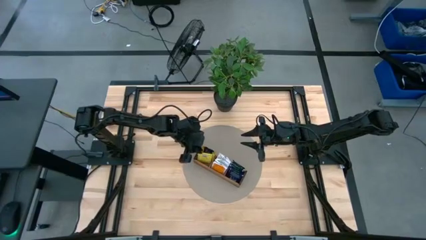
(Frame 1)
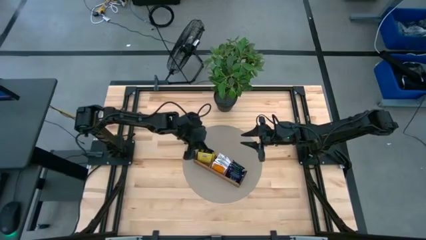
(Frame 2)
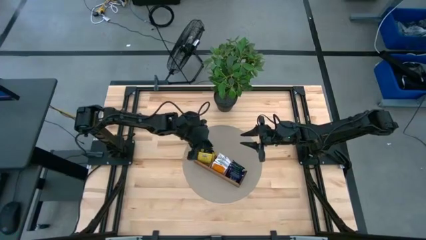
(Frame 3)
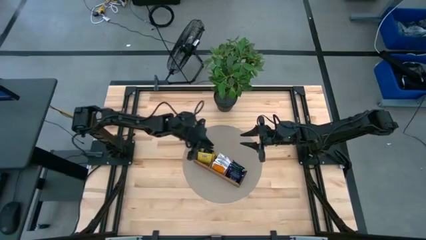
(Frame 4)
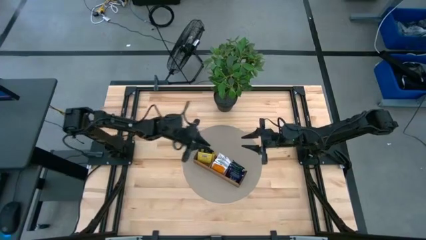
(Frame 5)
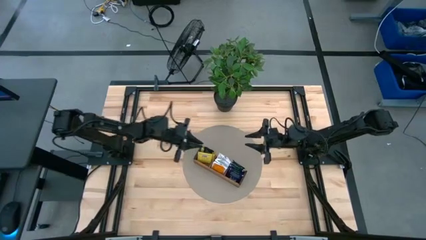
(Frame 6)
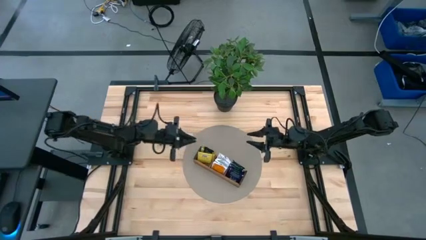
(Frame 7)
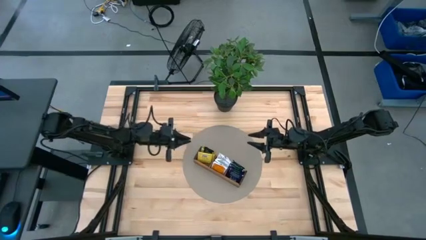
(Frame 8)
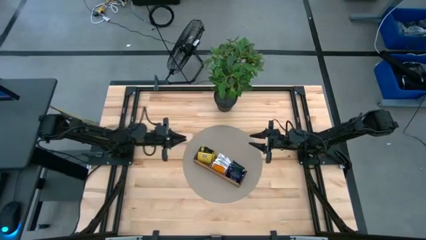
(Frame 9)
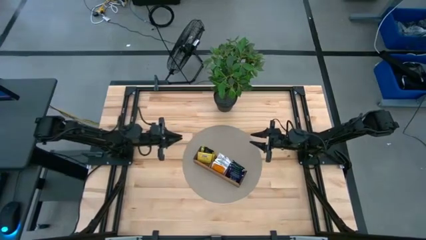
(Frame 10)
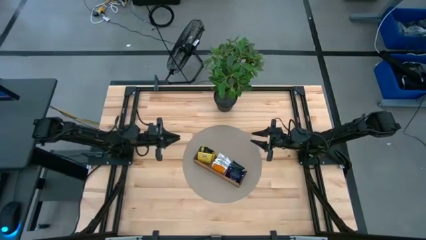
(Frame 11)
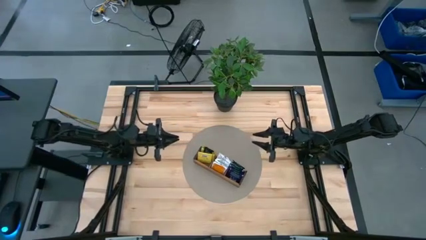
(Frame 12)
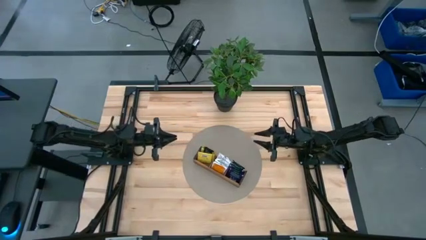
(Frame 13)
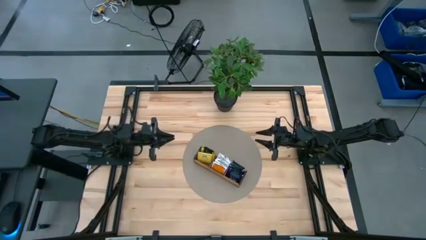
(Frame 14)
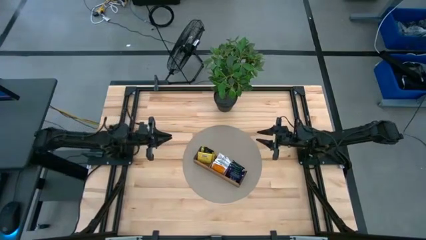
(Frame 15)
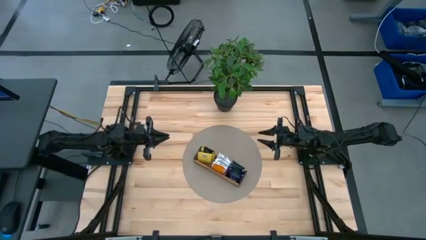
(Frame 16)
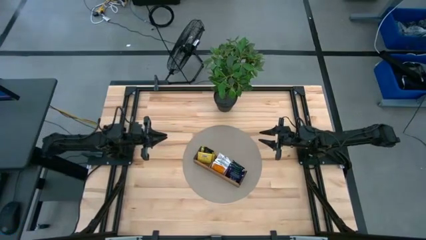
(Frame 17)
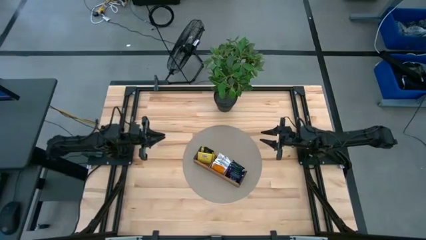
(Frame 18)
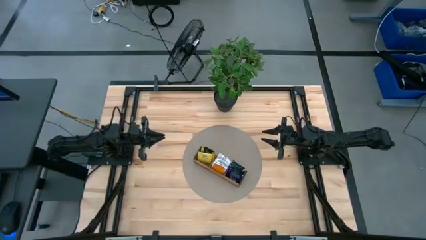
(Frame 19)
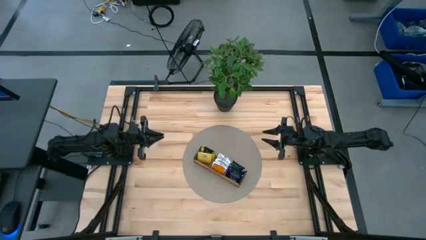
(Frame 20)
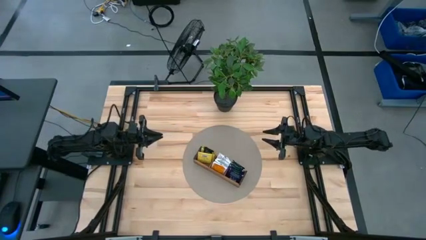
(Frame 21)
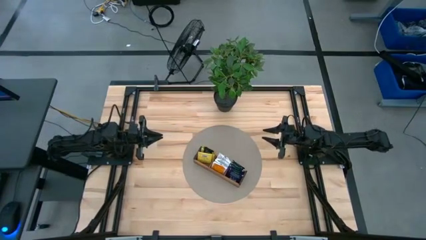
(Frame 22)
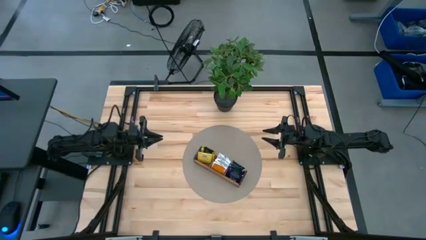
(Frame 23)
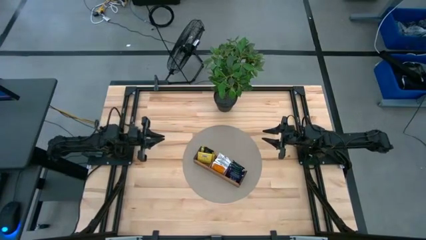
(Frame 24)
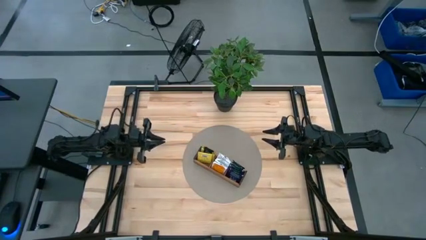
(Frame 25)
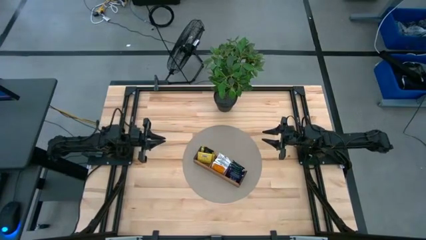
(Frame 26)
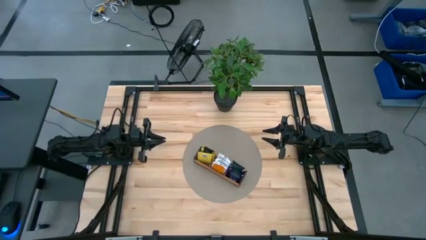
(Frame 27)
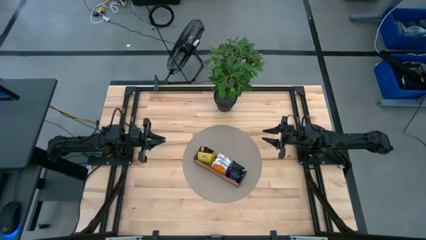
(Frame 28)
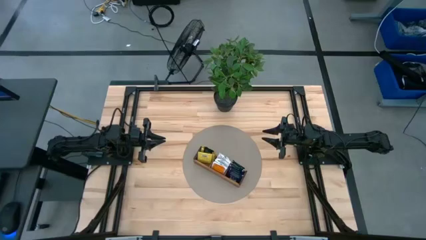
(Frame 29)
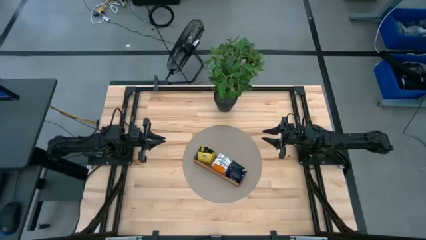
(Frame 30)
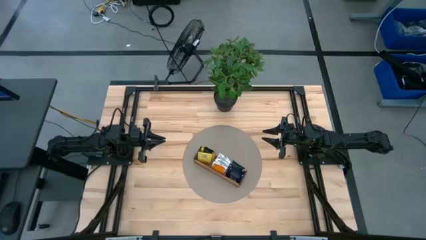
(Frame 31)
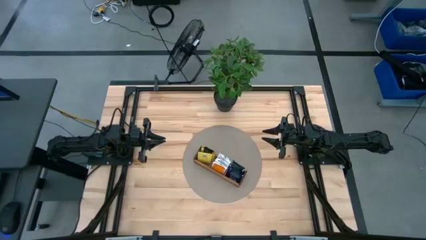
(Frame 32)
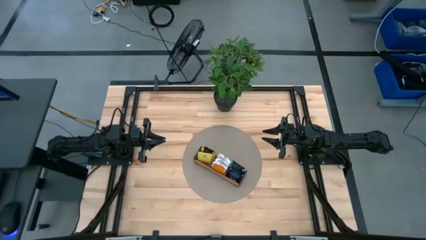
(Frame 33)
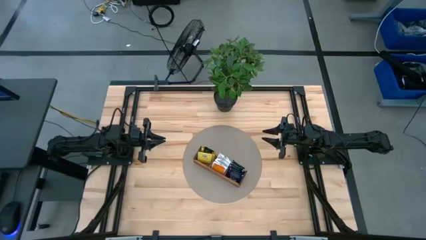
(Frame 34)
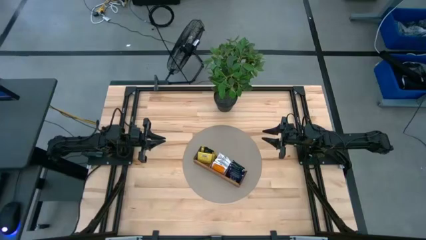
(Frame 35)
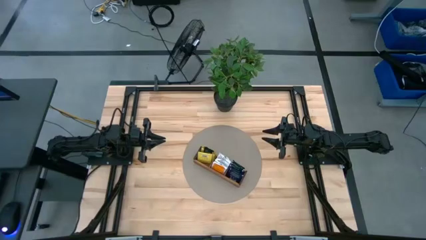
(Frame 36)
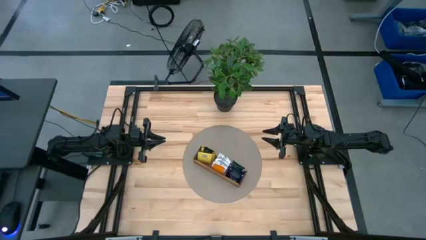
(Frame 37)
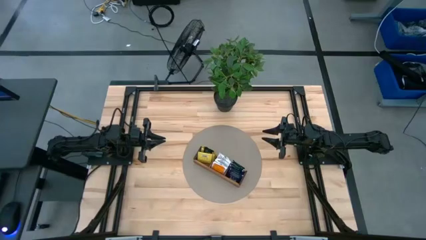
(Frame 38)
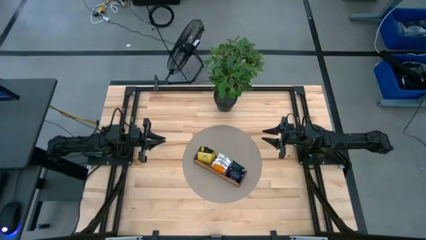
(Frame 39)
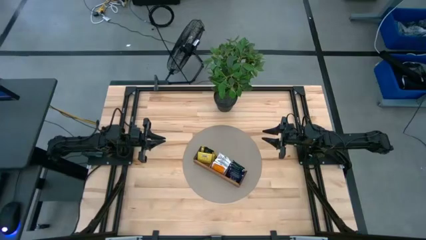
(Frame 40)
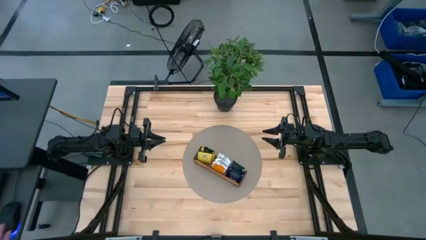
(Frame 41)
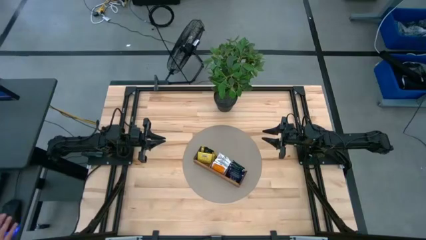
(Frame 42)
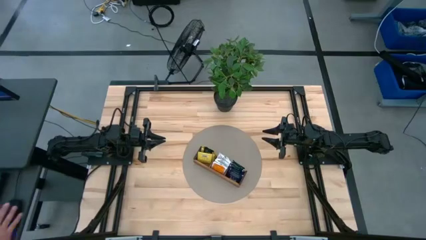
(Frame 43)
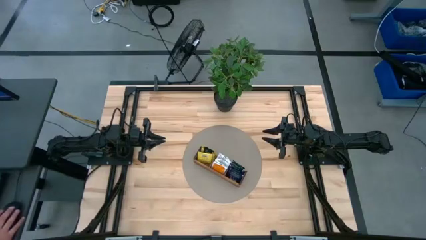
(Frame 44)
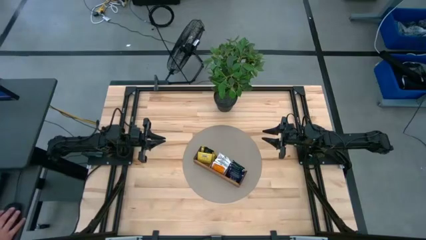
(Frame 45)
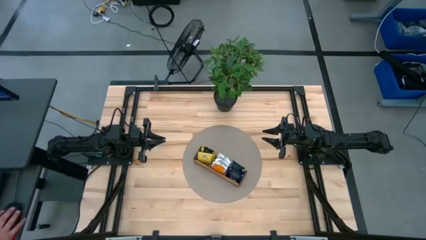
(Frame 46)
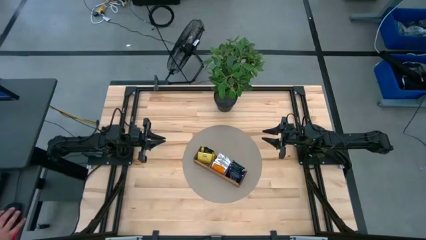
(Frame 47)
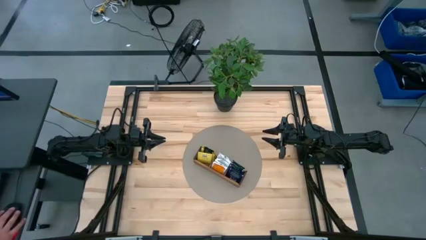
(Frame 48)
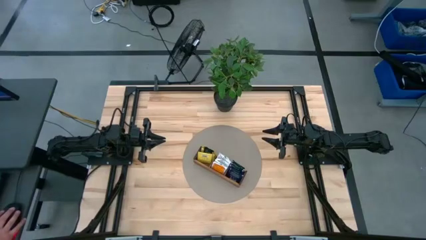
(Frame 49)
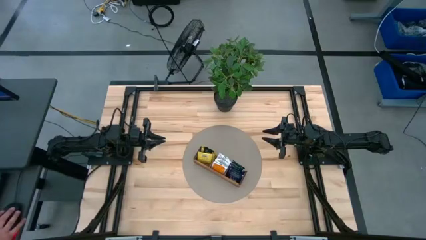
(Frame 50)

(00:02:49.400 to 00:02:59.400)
Task: Pick & Place Tea
Return to Home Position

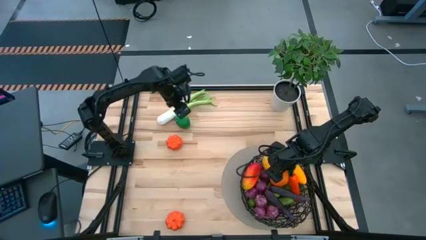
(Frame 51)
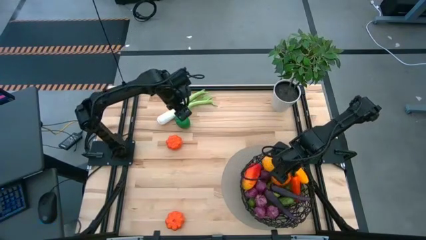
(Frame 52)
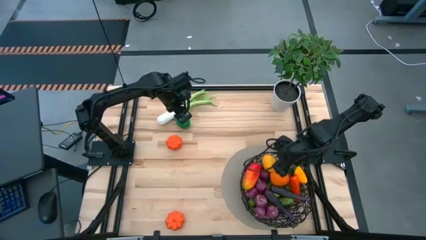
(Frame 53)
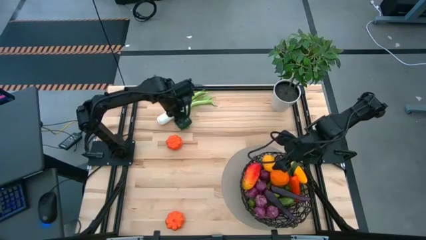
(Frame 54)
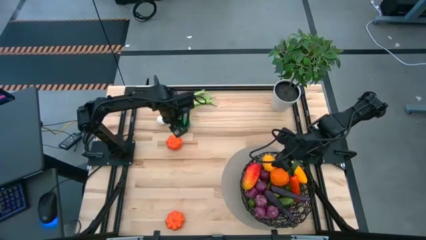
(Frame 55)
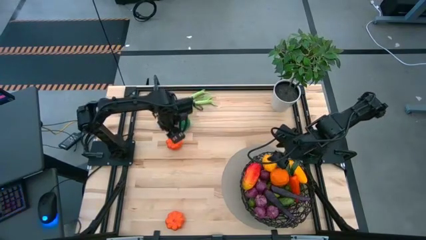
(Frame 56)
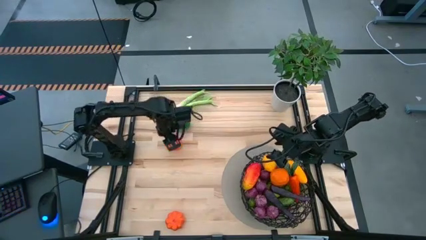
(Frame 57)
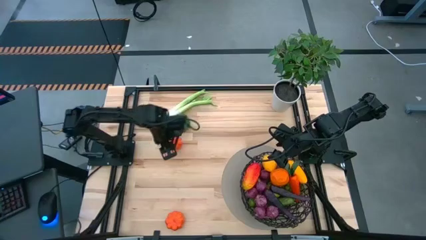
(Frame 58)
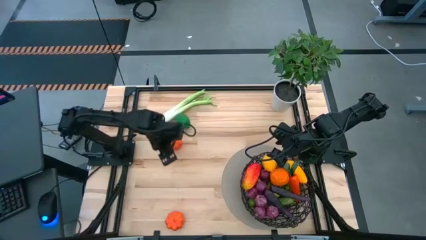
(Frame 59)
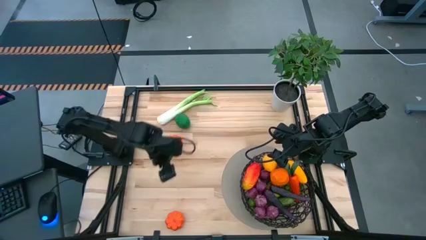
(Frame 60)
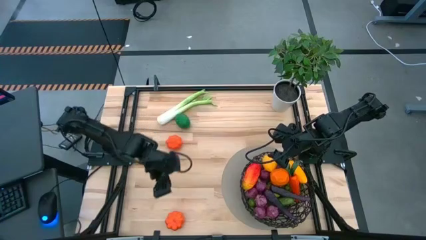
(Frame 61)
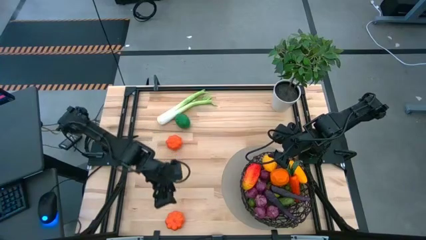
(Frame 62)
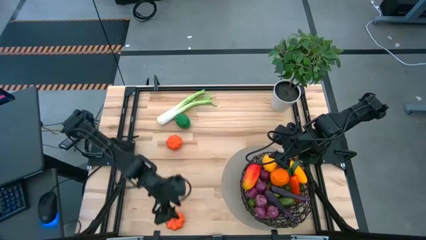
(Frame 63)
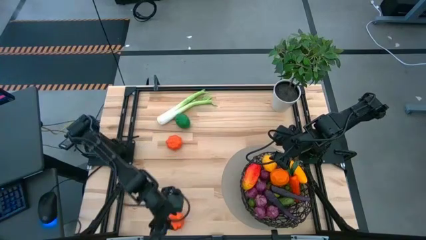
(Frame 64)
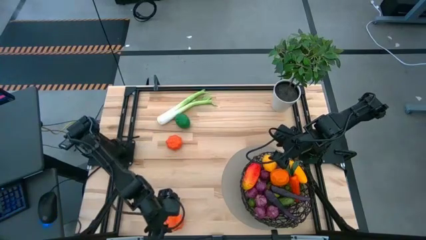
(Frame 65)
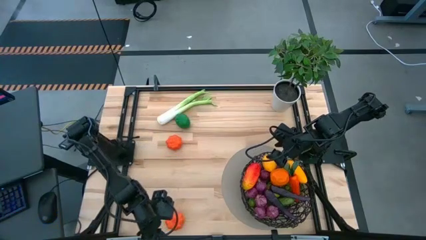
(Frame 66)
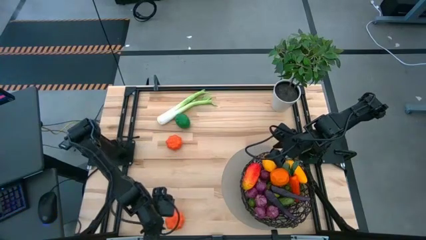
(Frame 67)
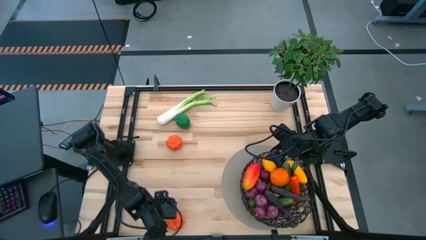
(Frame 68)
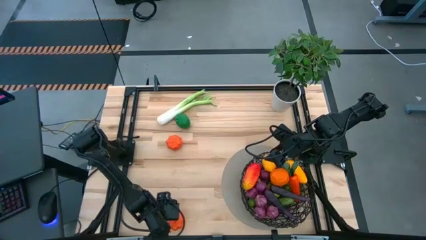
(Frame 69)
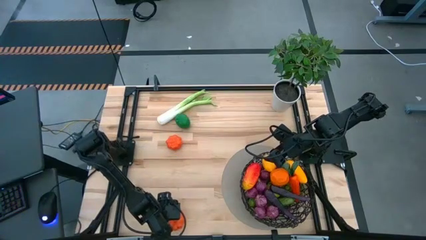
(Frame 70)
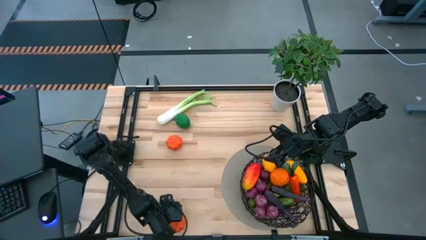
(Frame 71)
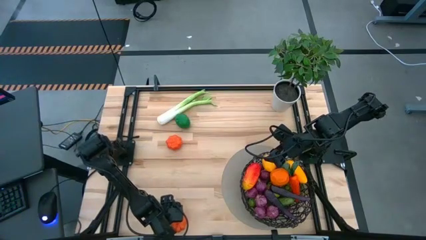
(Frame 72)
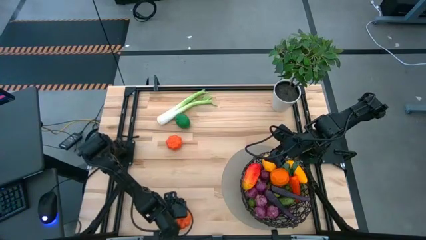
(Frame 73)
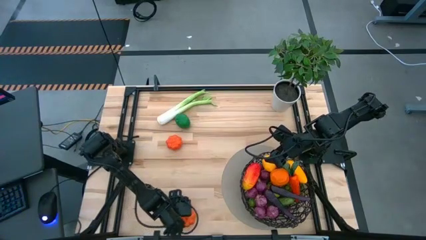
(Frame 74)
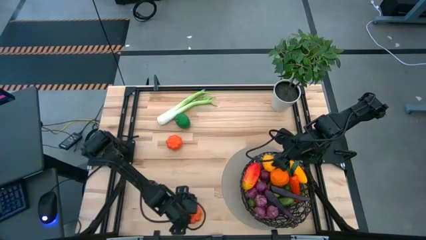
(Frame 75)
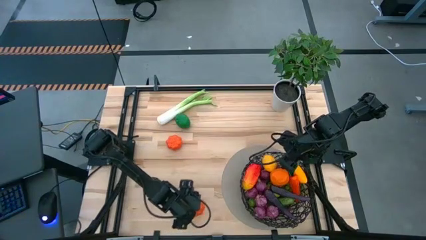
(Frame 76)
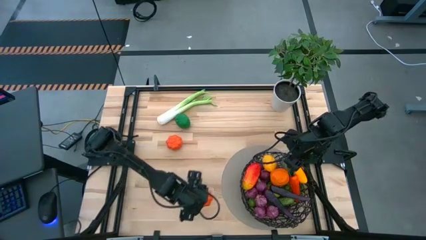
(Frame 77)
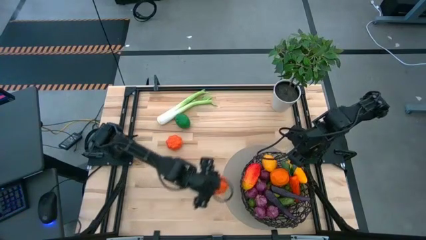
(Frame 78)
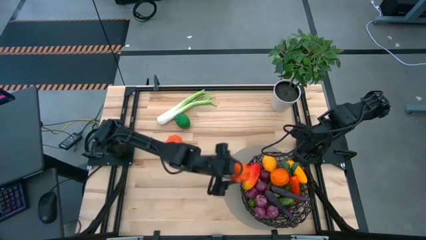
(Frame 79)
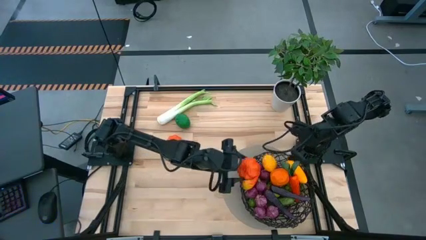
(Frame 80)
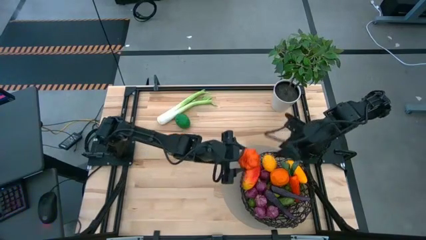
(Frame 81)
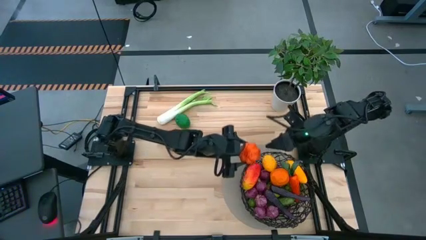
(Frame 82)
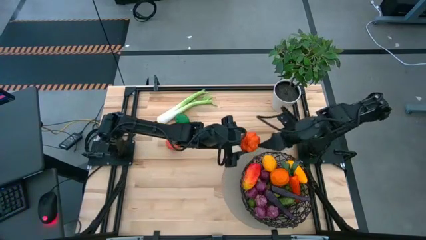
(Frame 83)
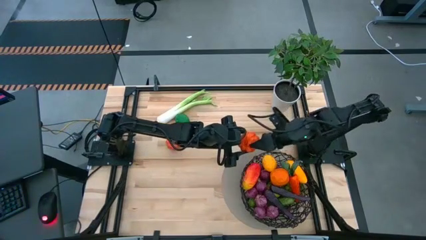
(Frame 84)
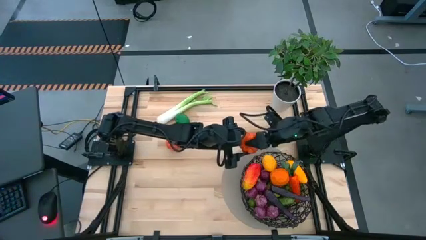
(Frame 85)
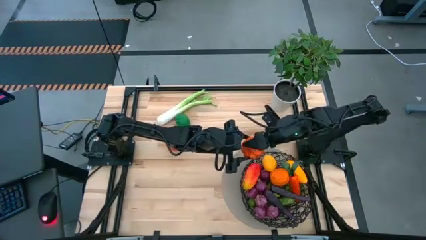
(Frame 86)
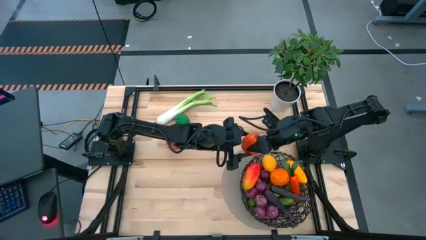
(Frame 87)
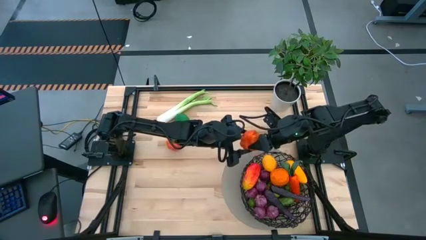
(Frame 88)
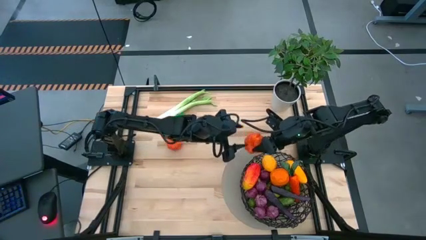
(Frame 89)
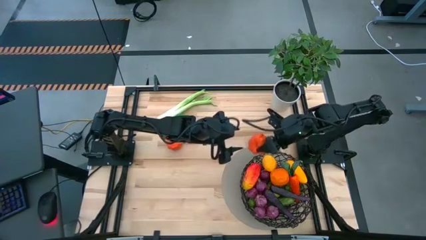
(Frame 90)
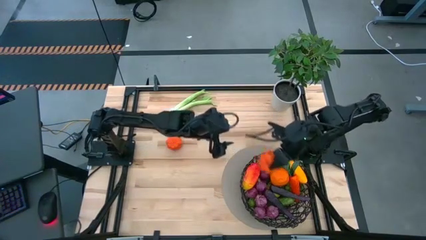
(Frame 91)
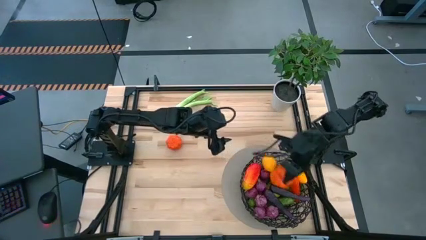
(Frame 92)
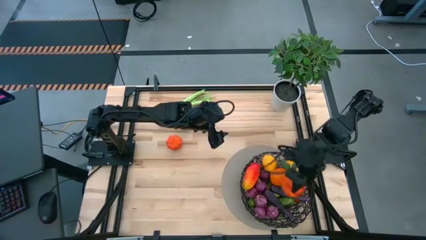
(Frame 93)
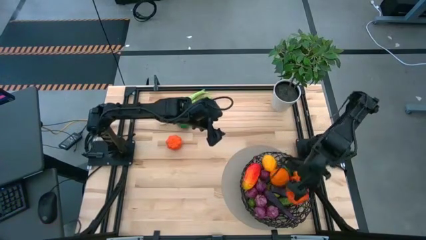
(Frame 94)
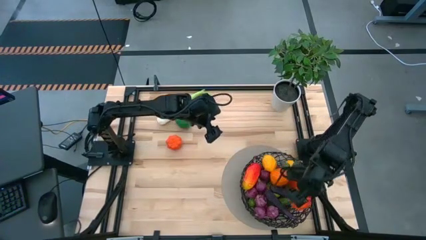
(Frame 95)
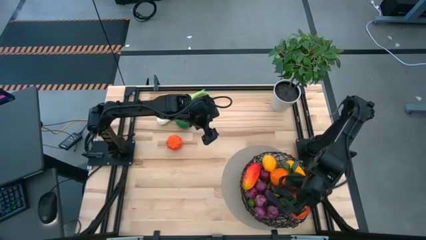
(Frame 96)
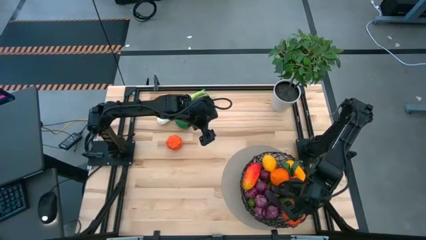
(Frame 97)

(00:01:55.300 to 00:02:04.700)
Task: Build produce basket
Put the bottom orange squash into the black basket
